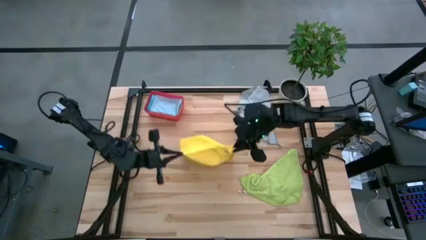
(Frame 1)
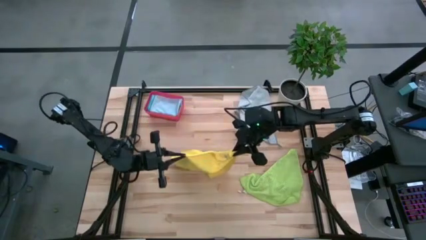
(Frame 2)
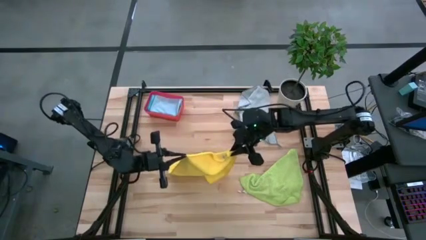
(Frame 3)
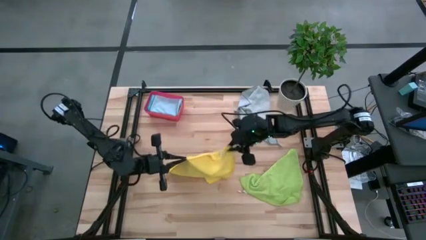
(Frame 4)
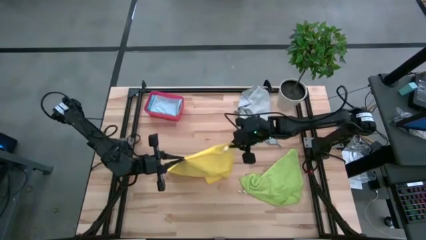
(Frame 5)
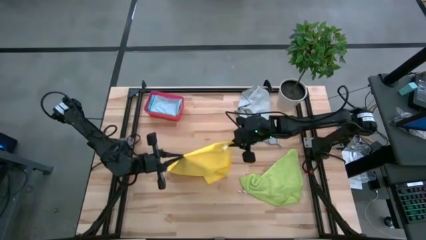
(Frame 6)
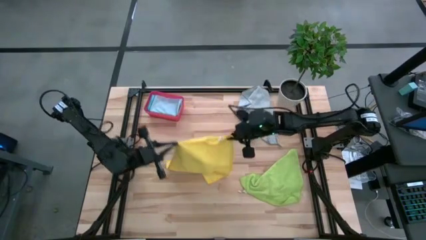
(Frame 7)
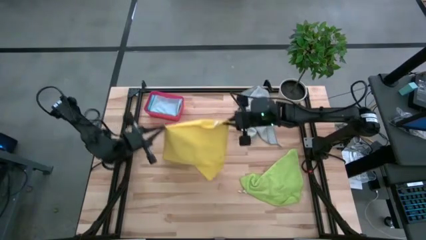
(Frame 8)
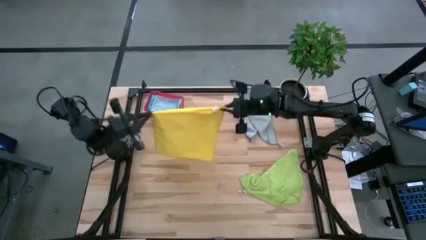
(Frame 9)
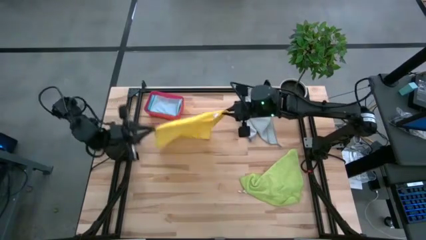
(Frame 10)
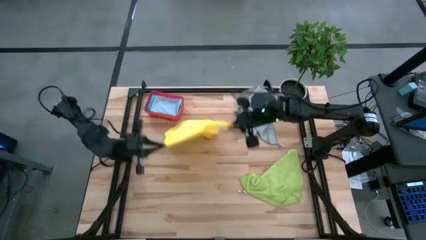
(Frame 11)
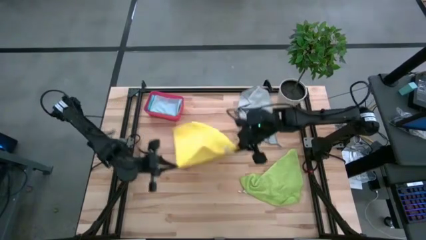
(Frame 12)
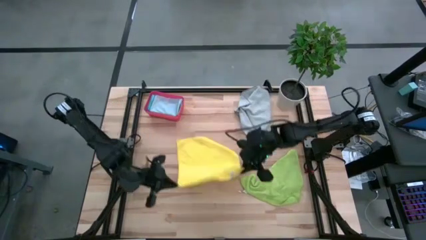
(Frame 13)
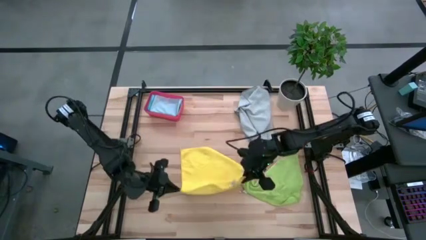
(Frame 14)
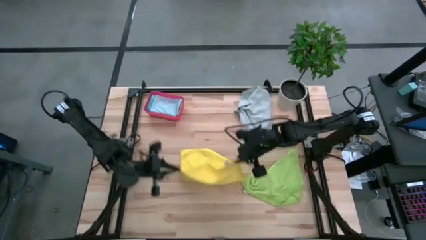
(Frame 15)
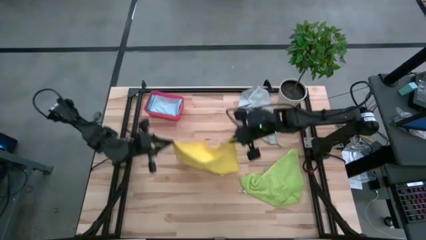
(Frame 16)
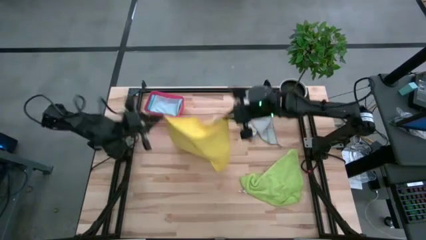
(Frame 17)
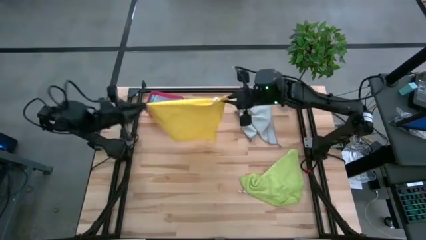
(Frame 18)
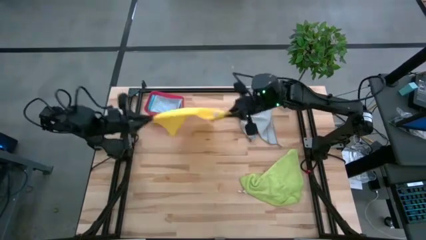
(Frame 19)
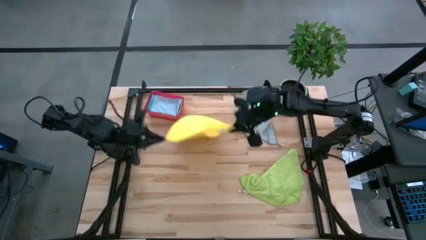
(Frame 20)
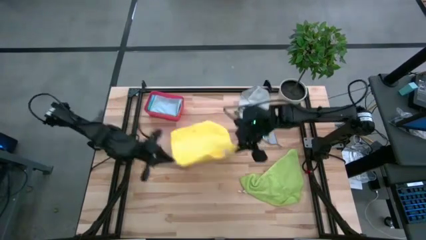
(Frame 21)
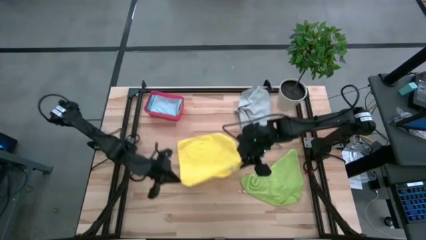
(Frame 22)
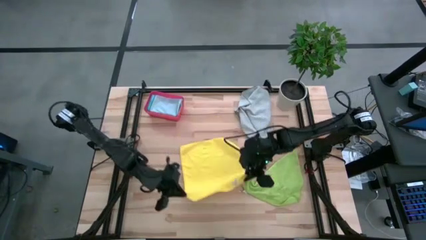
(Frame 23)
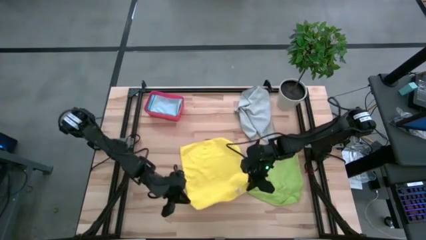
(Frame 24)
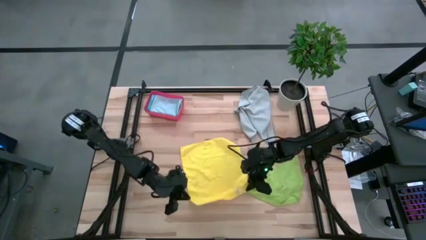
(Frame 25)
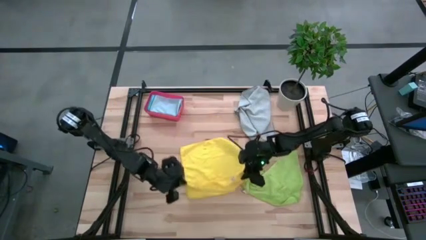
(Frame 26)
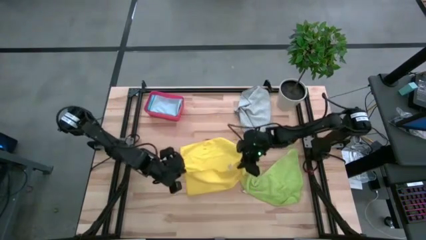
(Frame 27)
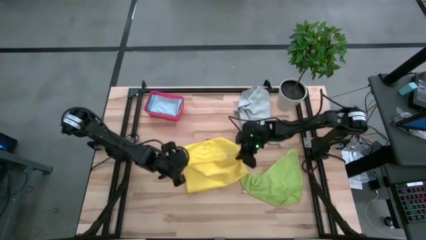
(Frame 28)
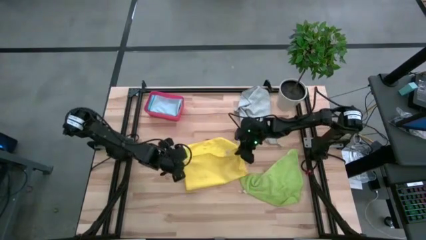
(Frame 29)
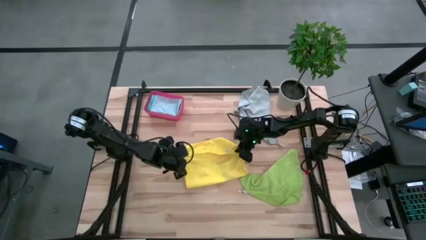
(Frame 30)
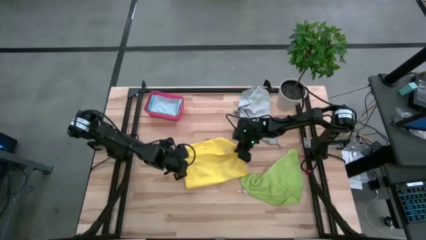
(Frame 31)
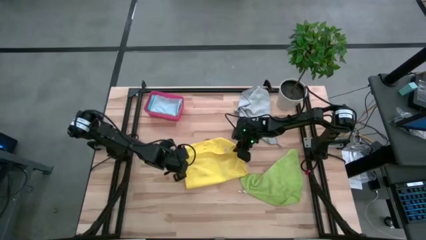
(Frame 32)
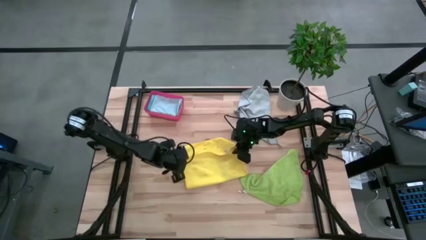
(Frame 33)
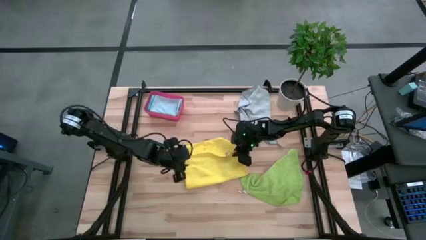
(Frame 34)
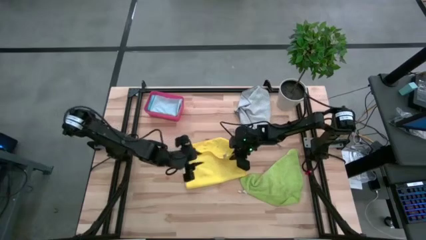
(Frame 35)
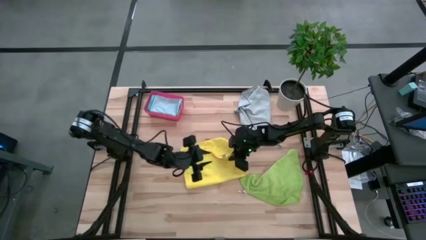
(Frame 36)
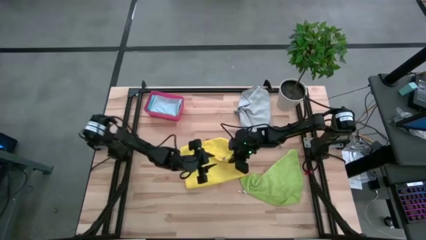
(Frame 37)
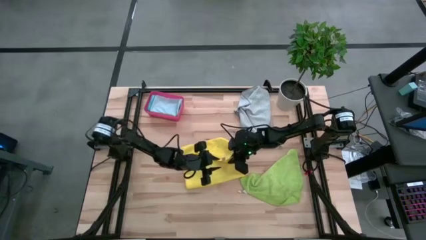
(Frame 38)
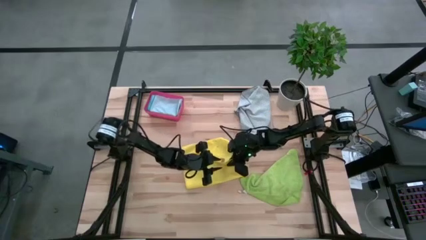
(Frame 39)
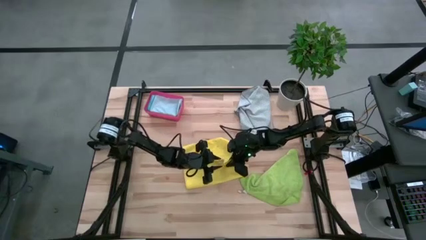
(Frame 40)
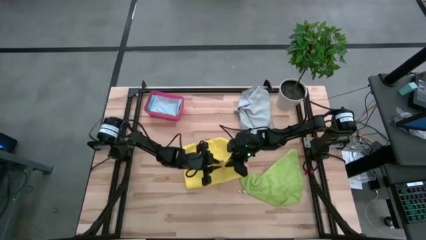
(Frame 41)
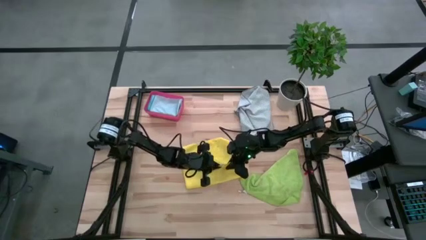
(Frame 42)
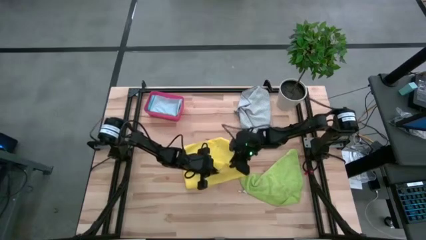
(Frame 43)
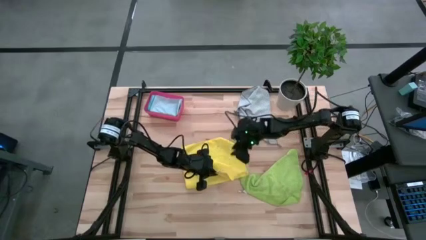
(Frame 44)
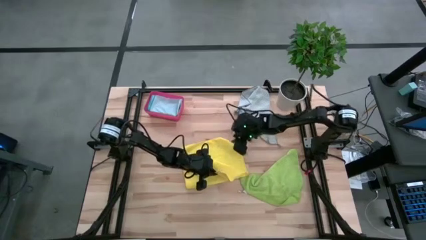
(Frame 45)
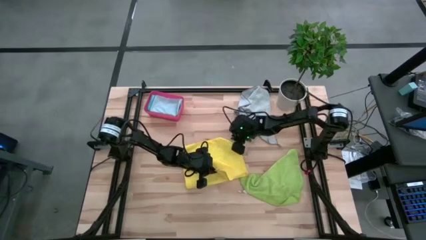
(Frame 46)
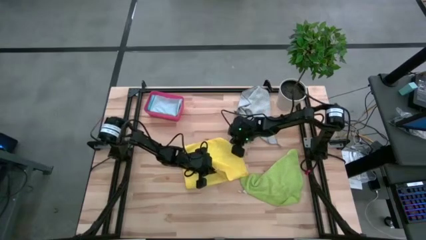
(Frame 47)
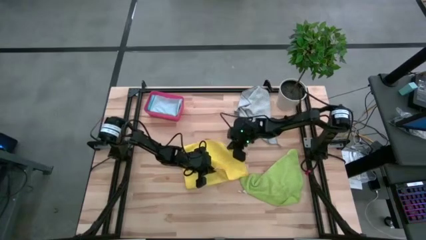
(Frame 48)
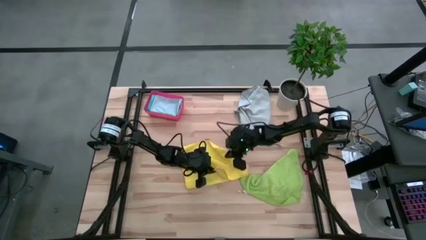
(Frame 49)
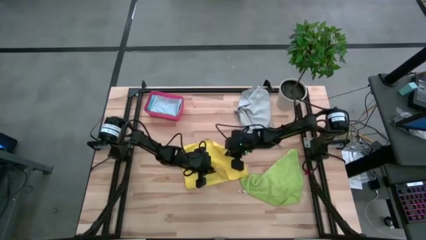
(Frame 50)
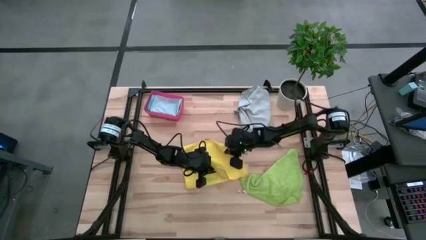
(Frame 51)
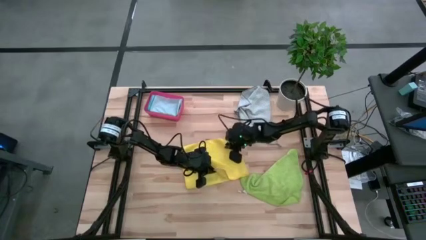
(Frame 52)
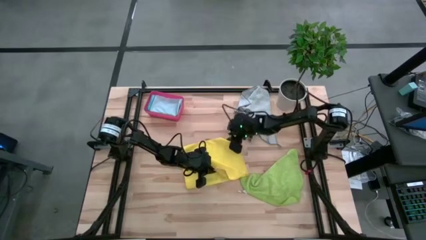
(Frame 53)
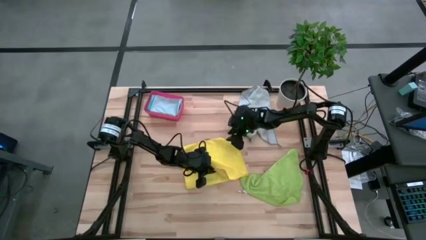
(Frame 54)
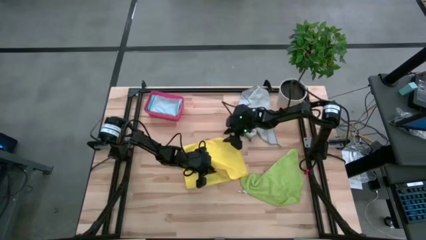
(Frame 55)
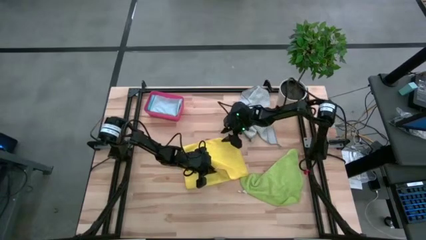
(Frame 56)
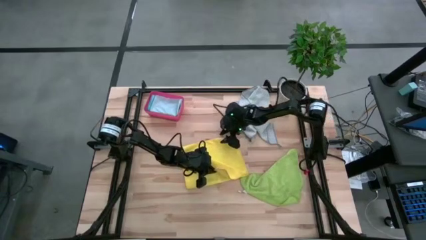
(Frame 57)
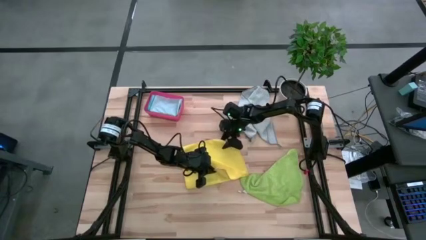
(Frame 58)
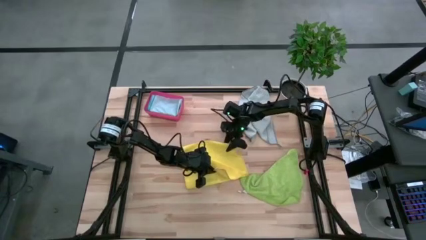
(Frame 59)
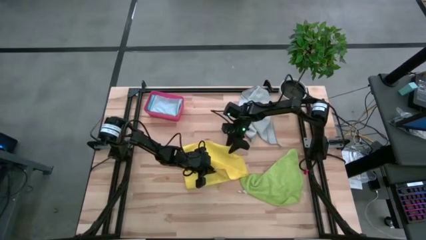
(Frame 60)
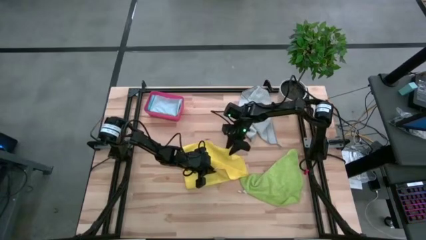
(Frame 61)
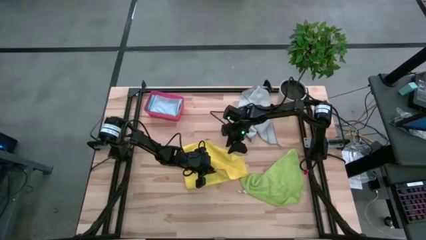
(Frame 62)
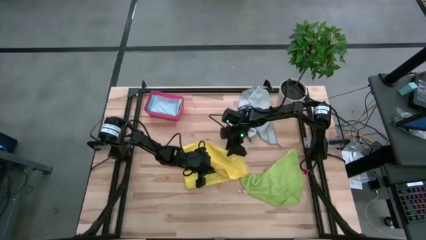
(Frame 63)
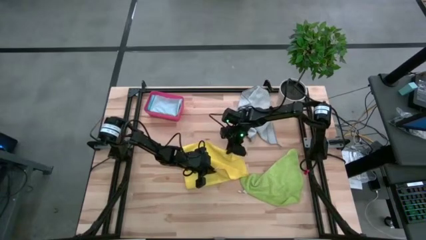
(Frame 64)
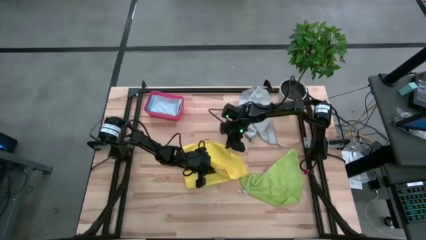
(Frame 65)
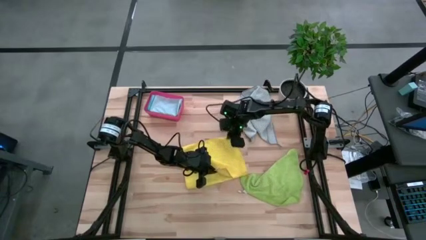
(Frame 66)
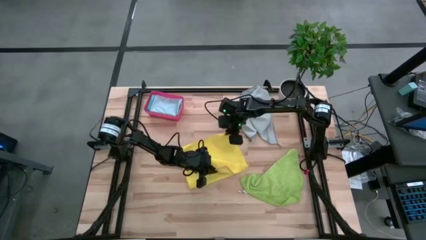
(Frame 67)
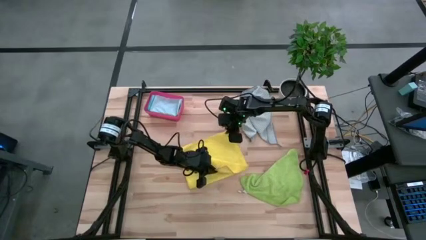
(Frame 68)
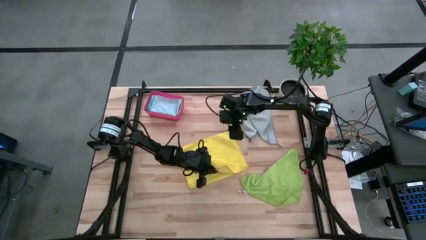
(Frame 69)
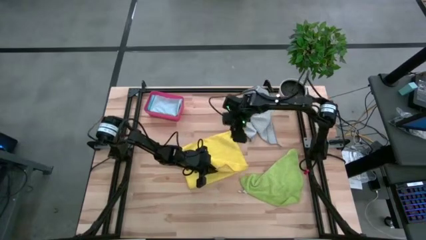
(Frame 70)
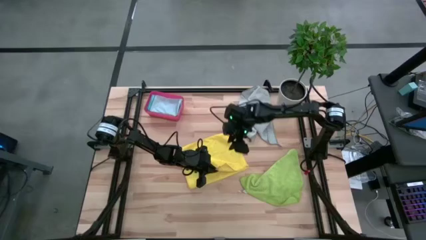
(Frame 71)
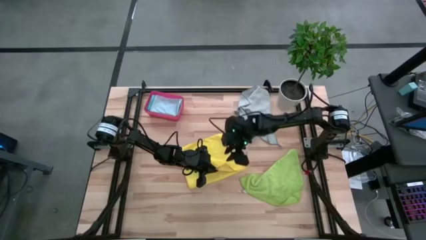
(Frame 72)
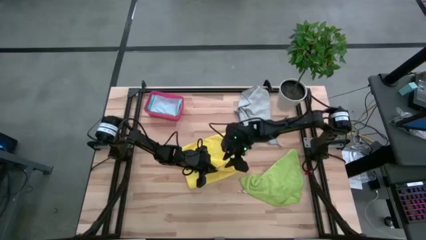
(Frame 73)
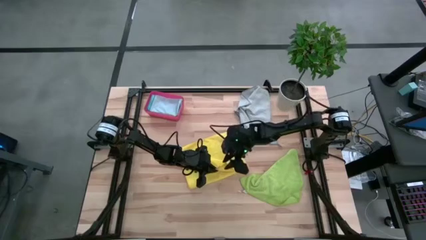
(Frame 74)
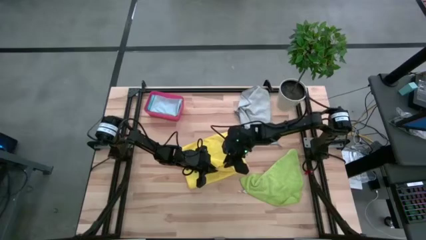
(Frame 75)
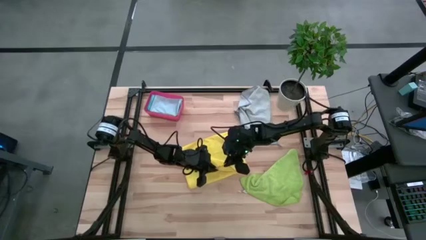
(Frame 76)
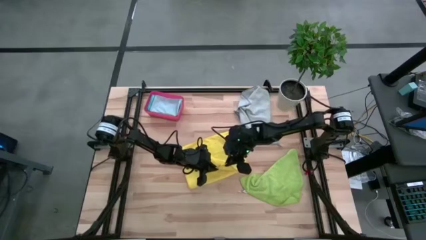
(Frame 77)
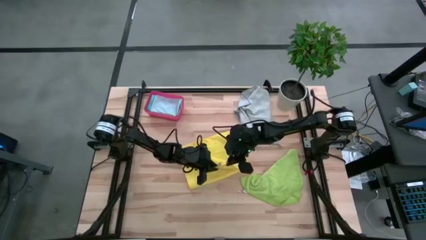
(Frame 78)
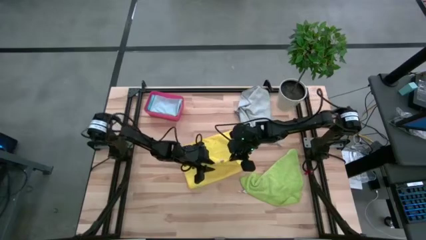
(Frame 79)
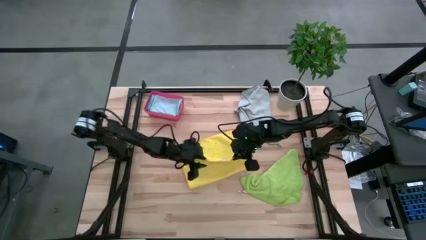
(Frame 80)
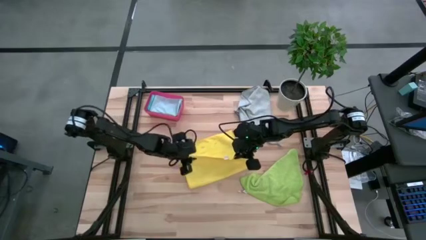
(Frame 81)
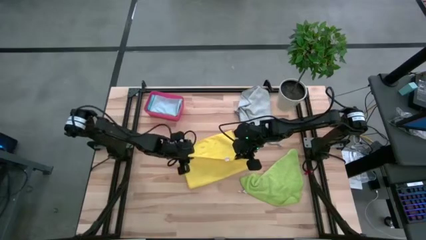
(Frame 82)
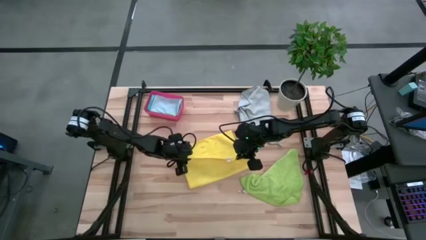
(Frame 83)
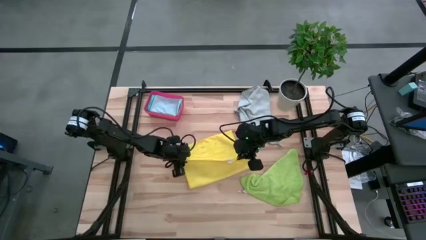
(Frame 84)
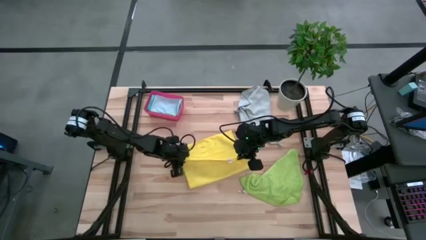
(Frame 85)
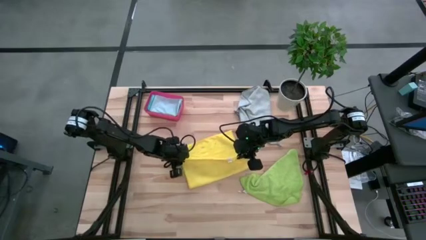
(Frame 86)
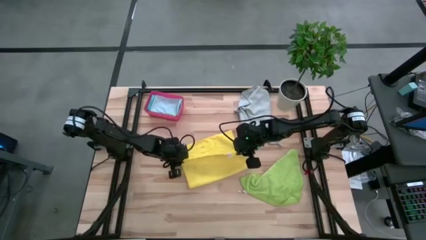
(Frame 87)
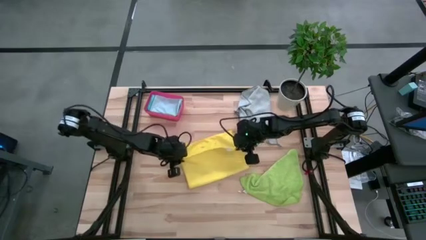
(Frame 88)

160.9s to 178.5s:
Task: Fold microfiber towels
Fold the yellow microfiber cloth
